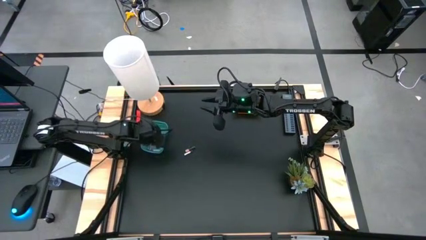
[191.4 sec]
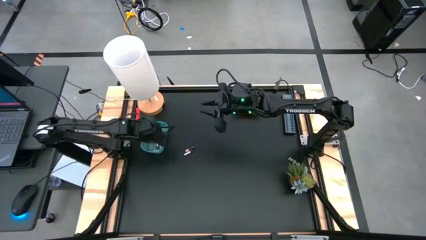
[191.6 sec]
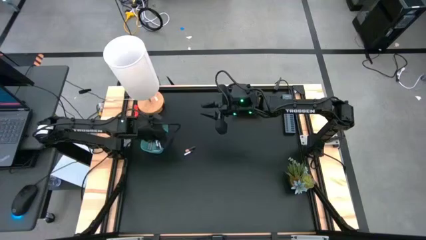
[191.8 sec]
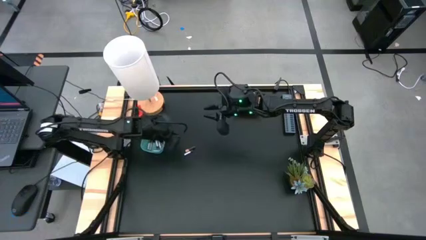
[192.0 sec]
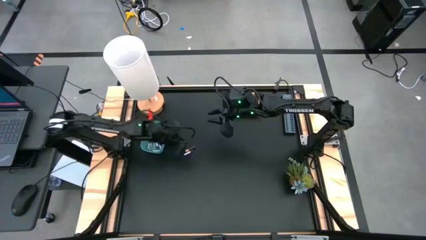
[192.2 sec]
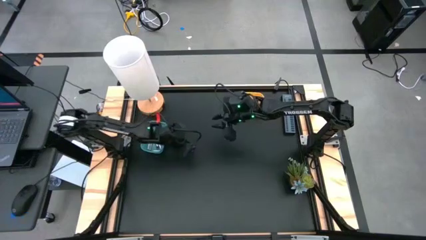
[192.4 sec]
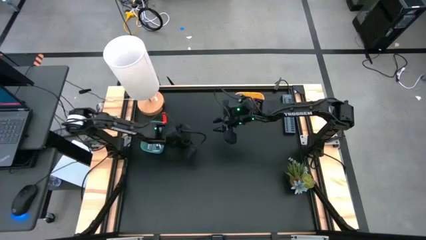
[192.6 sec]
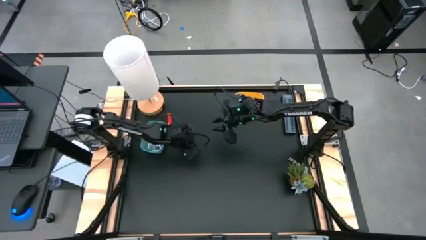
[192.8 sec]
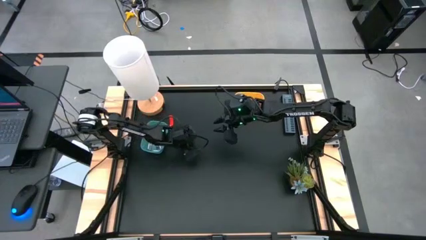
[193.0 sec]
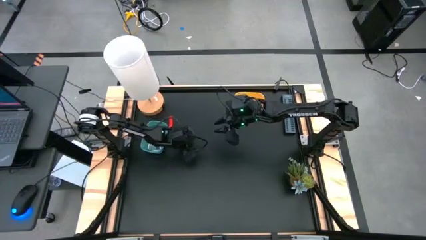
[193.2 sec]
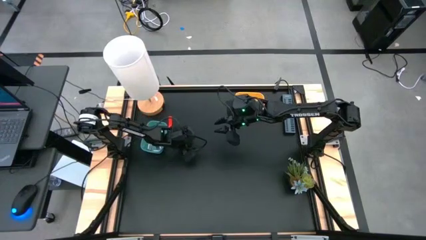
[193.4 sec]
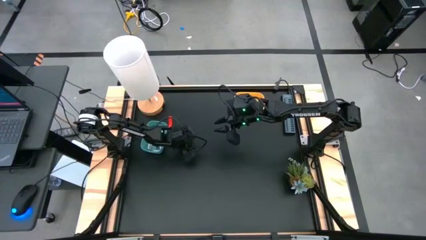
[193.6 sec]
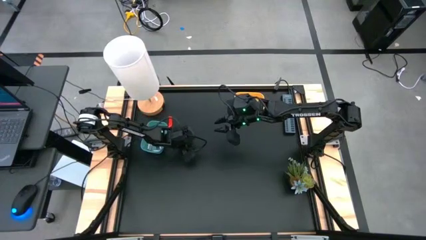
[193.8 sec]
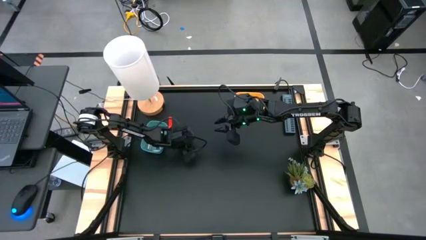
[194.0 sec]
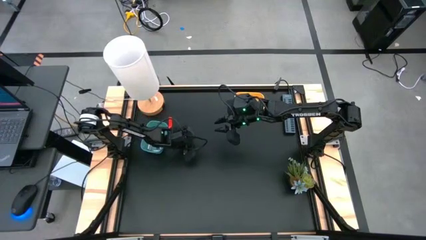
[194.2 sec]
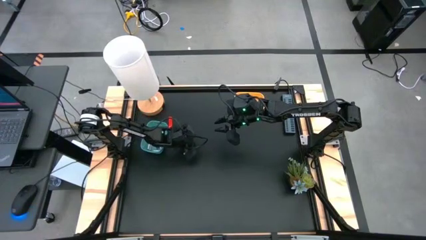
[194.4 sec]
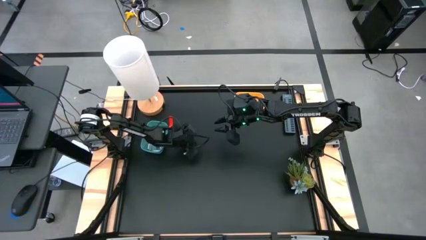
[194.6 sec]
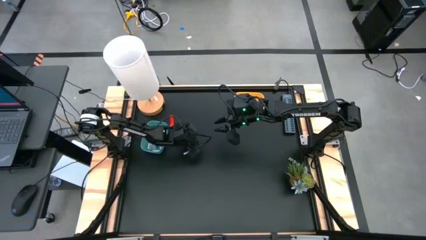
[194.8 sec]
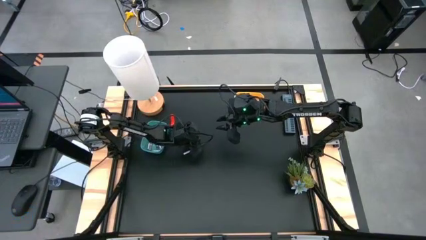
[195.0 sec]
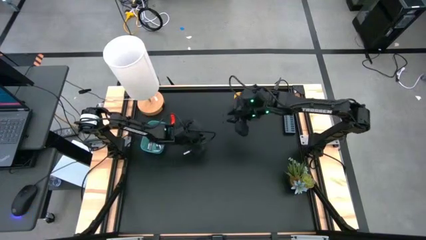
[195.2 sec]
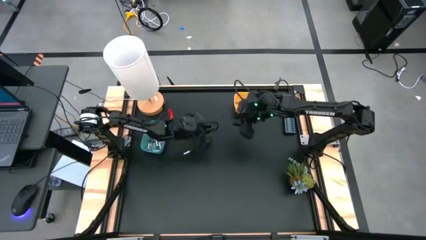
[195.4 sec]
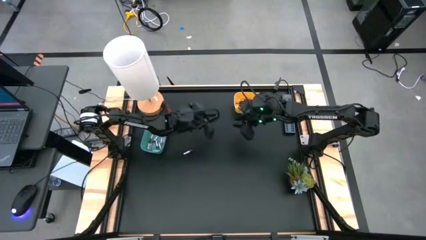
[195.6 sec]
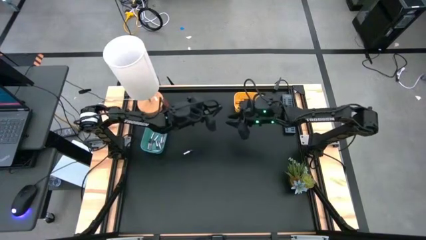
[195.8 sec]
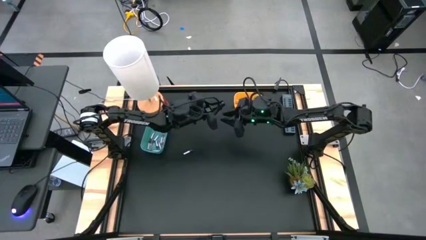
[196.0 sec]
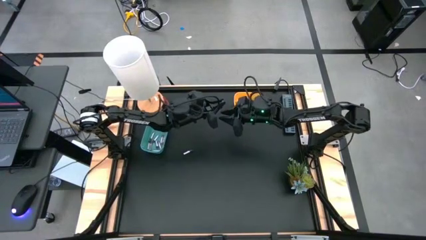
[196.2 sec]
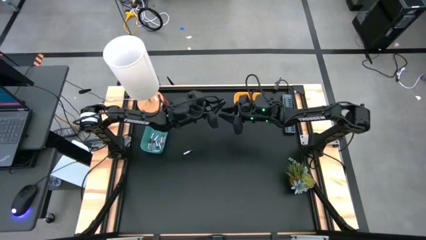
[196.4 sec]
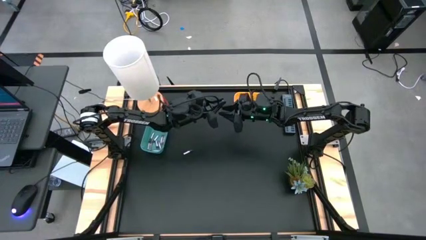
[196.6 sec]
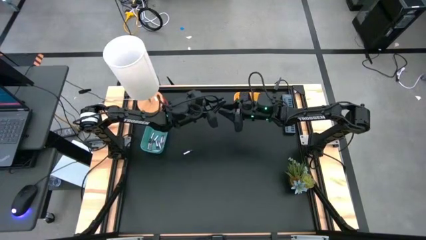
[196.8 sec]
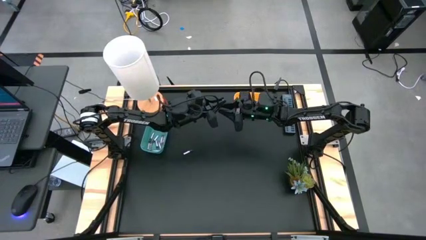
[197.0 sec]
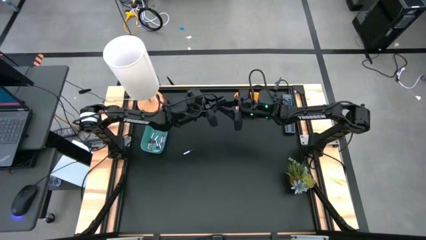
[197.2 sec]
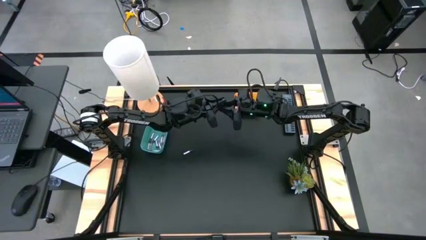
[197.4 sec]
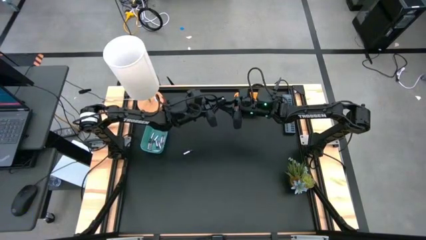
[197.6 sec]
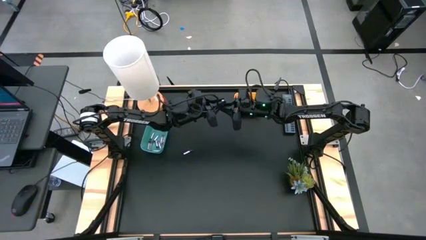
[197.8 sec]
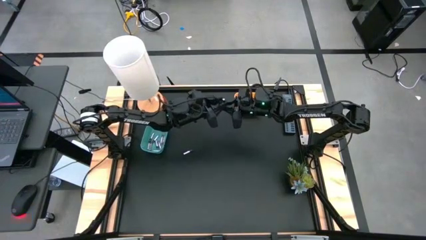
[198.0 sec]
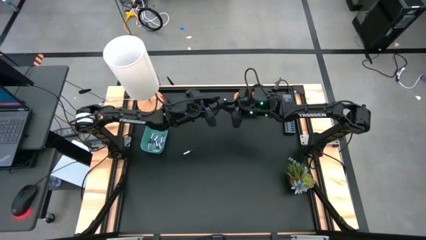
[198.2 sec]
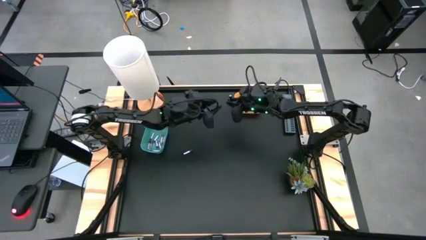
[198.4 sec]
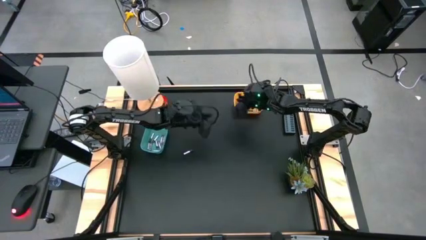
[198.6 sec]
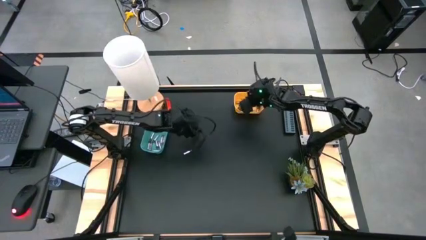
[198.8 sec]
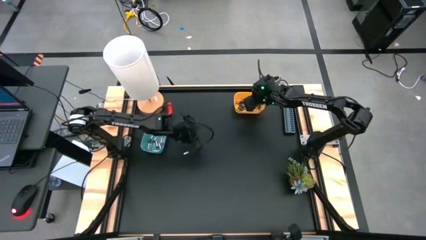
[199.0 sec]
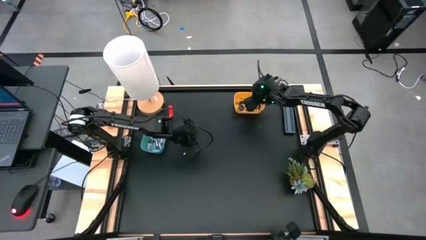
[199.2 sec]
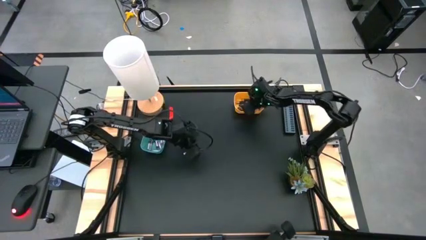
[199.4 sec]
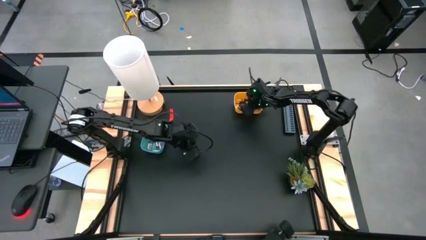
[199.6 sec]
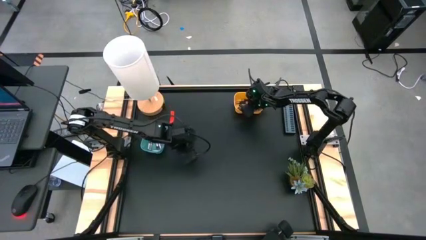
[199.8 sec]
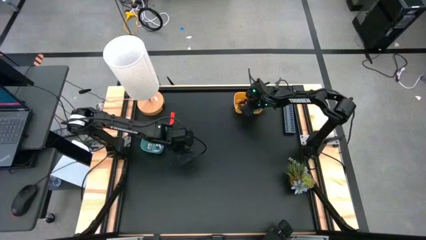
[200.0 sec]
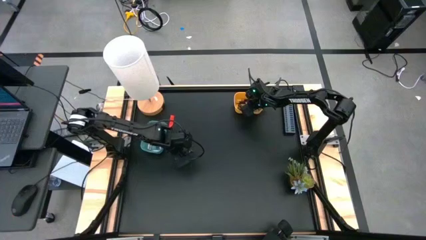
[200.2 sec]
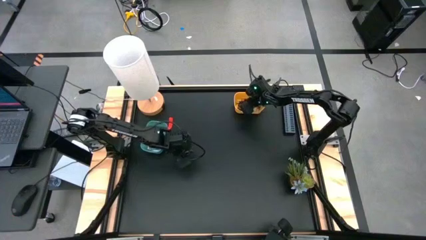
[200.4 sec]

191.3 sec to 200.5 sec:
Task: Sort batteries
Put the black battery into the yellow bin

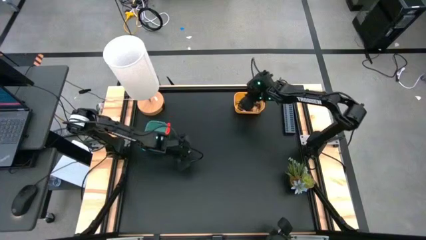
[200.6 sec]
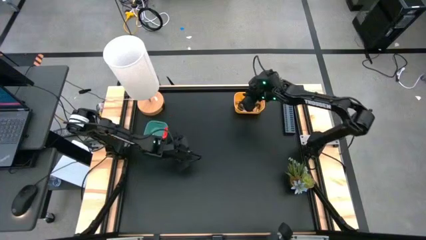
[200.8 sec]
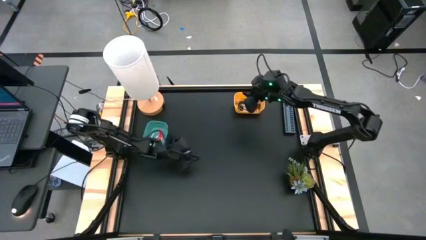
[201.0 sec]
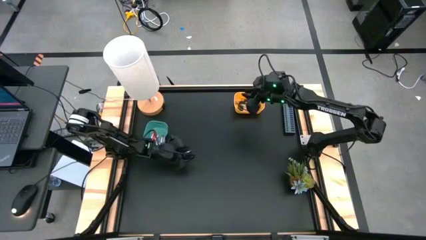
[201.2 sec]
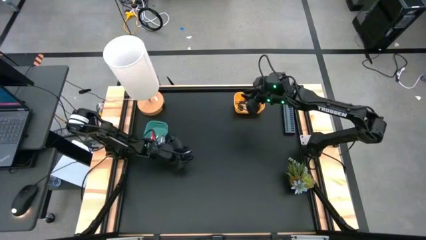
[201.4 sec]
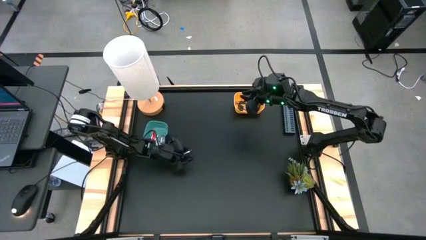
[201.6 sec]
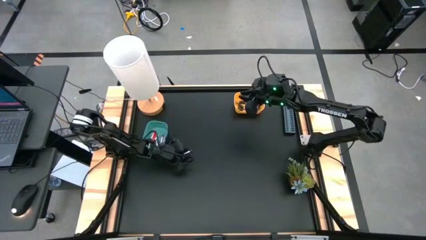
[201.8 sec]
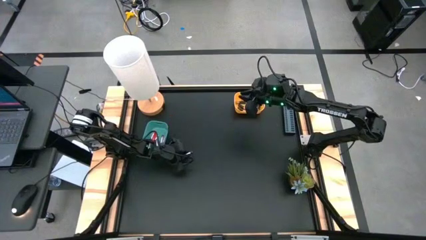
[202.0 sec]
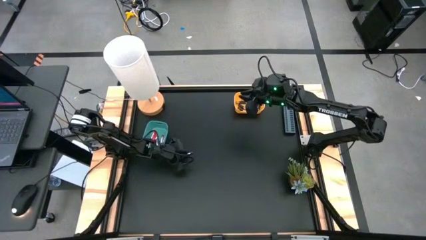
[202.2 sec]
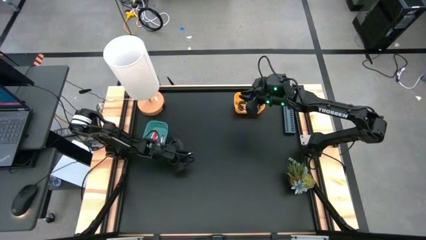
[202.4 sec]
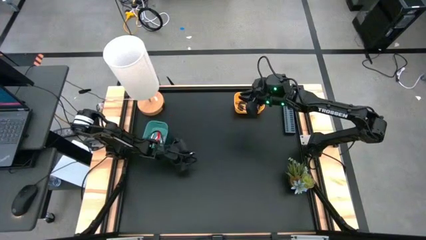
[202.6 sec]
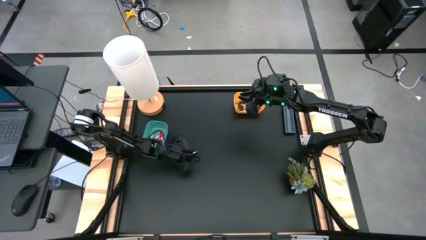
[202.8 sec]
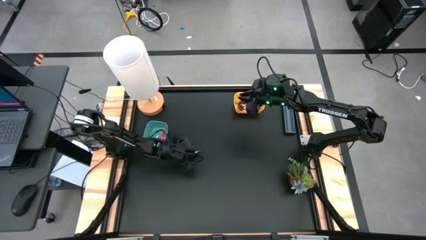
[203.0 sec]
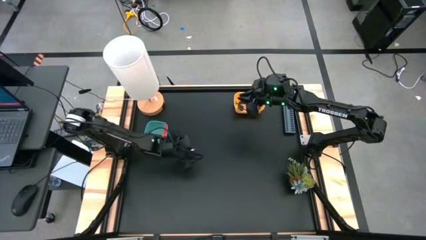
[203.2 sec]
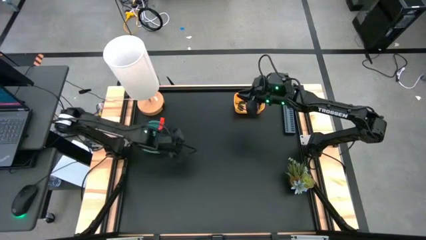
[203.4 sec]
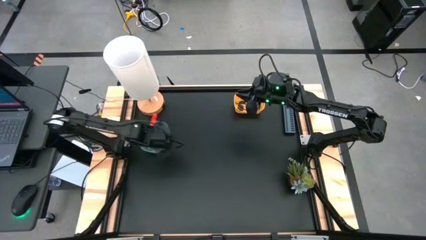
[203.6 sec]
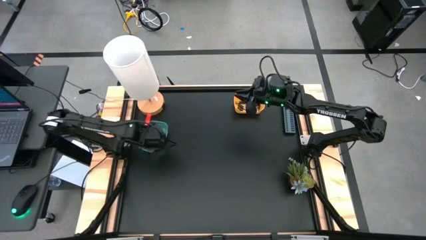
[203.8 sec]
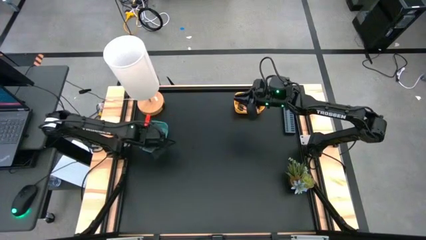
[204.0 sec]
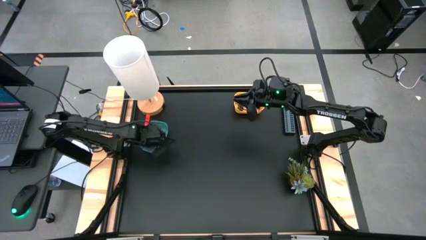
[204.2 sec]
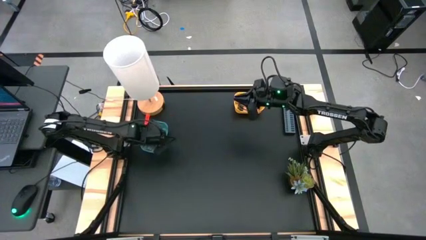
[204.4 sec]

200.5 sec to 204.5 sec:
Put the silver battery into the green bin

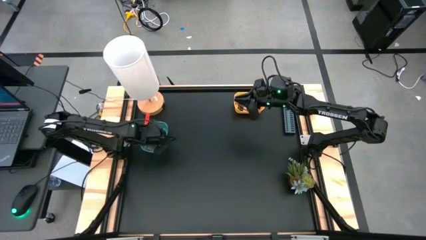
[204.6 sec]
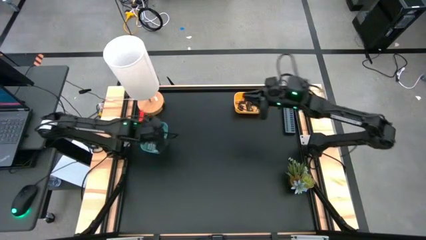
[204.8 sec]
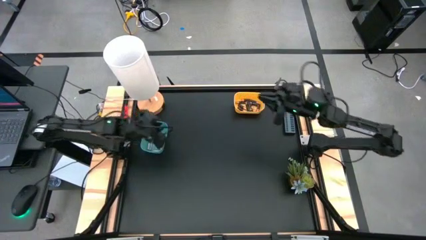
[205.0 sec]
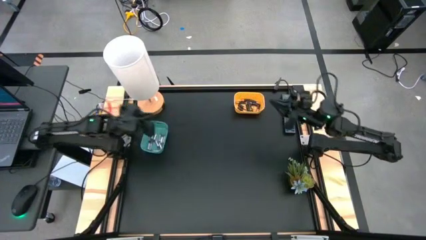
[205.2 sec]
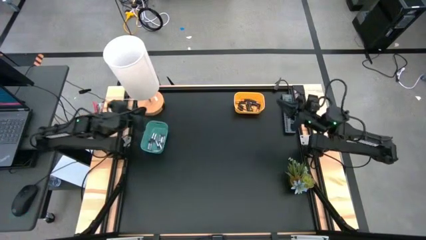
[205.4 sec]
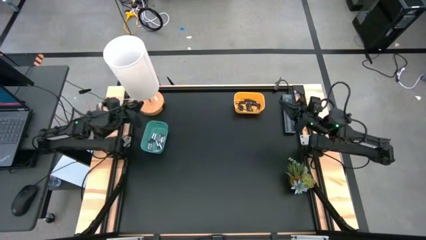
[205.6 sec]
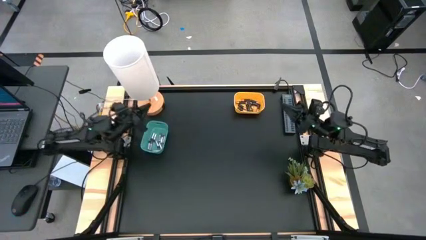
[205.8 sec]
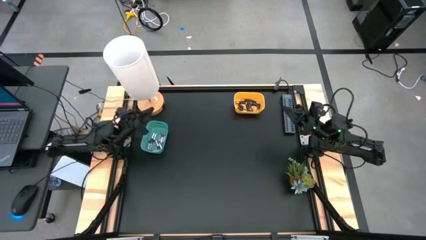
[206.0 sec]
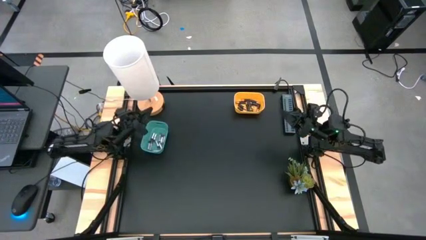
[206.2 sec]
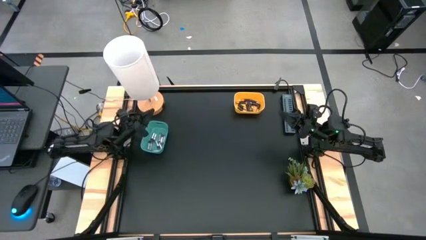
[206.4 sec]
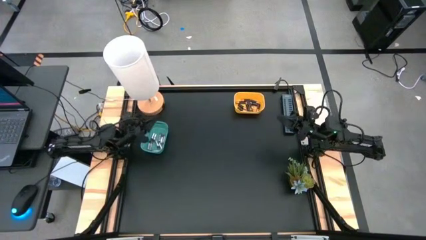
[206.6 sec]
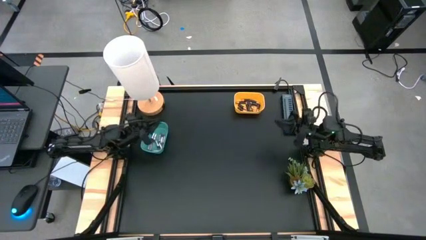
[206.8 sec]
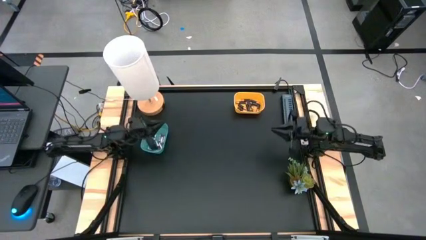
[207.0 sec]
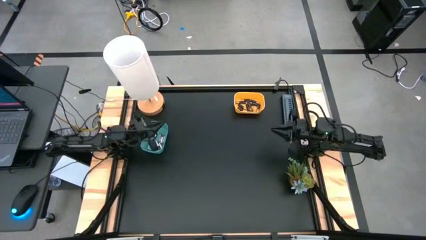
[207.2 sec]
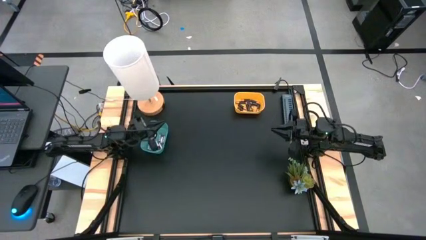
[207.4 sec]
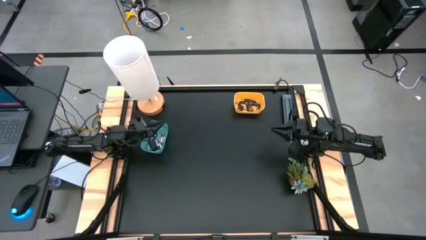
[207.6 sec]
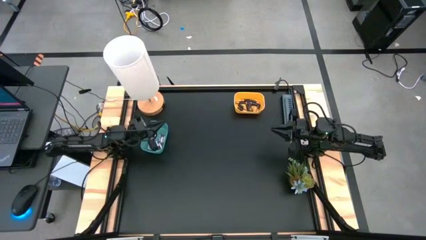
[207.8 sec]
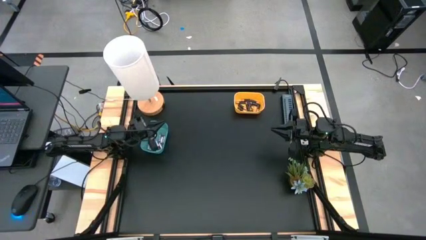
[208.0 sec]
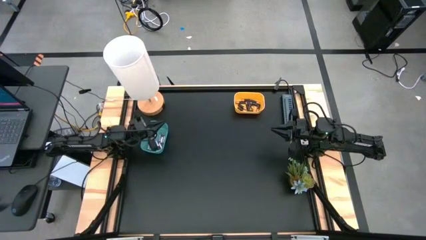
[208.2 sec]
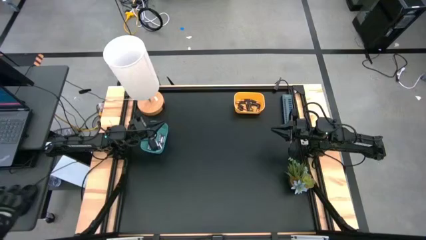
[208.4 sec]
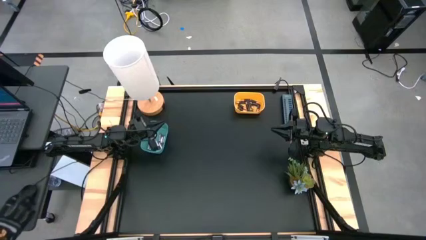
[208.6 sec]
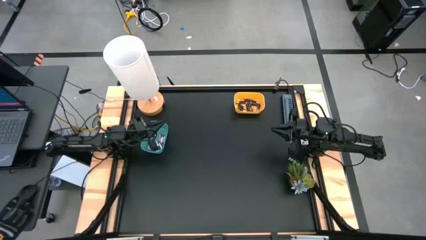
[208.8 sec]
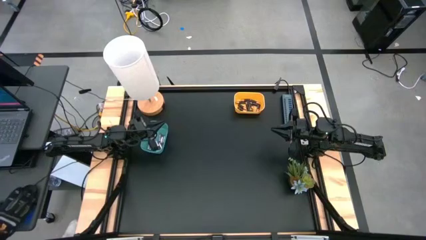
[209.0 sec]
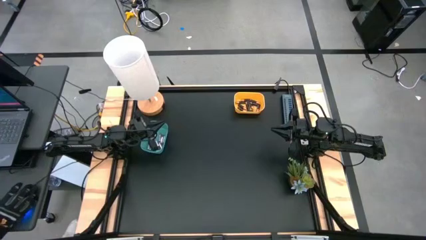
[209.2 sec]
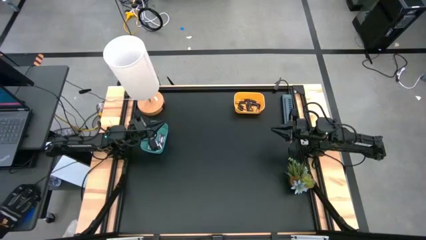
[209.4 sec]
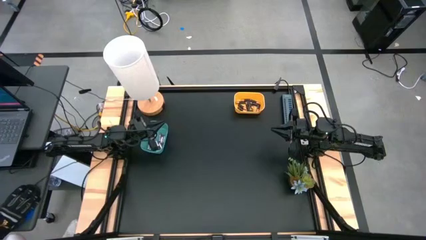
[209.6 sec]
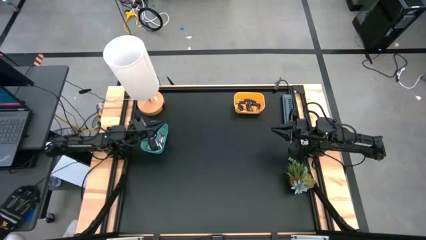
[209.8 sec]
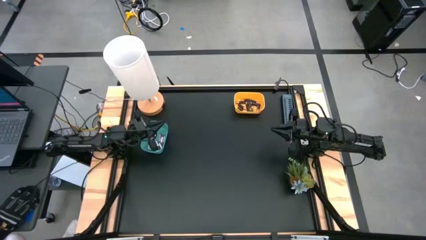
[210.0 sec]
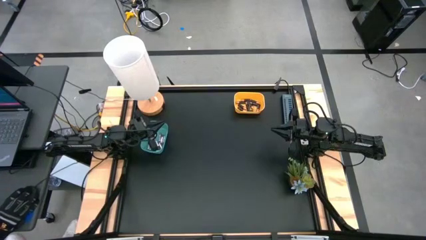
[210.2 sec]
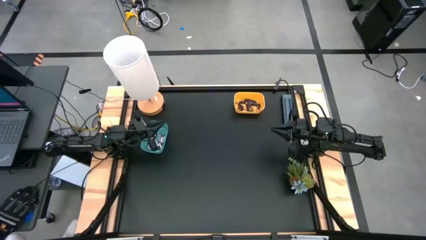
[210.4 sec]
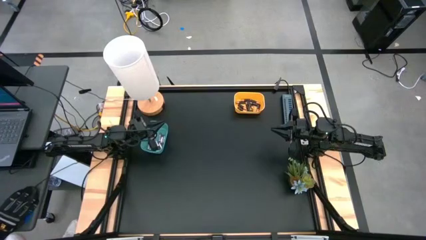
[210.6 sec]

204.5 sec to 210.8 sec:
Return to Home Position
